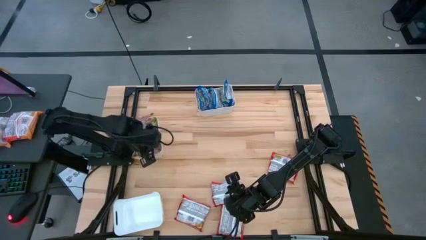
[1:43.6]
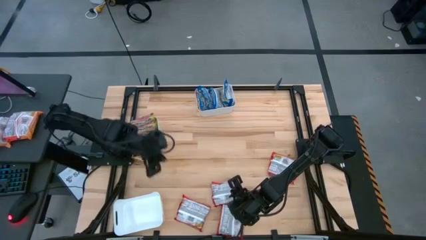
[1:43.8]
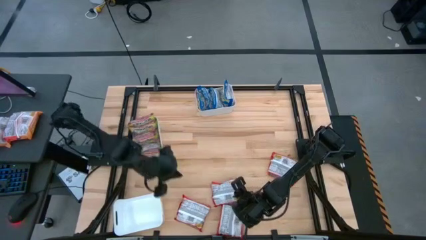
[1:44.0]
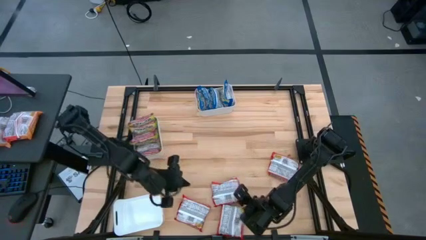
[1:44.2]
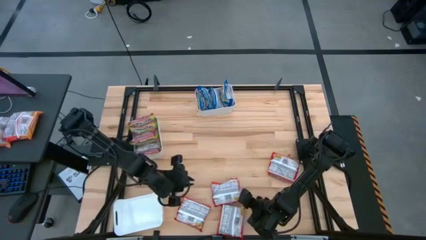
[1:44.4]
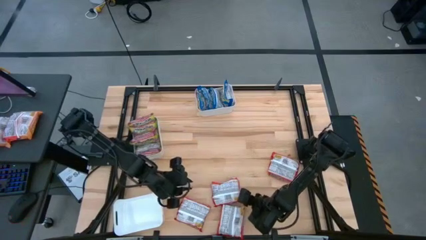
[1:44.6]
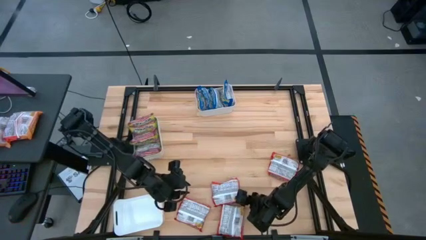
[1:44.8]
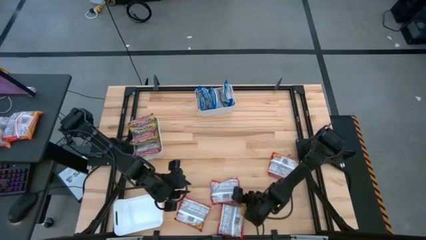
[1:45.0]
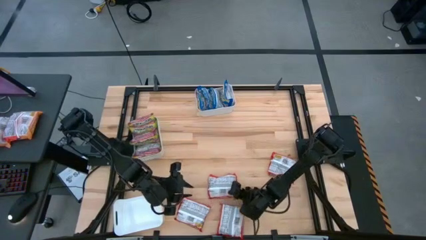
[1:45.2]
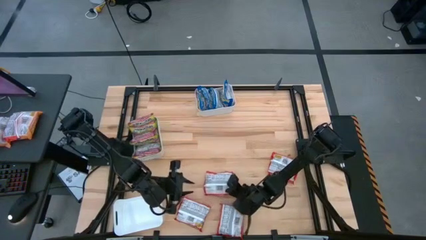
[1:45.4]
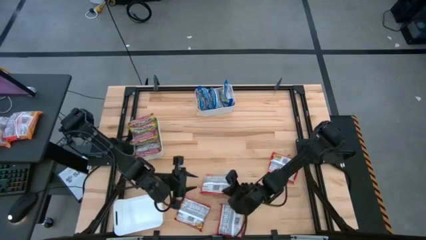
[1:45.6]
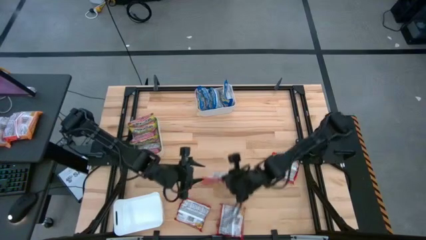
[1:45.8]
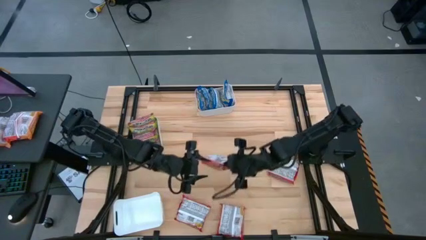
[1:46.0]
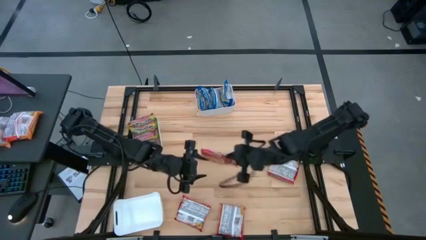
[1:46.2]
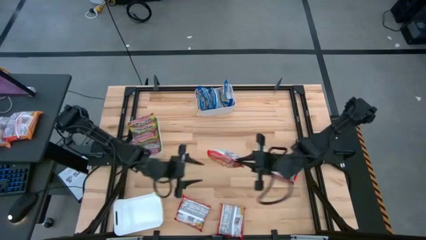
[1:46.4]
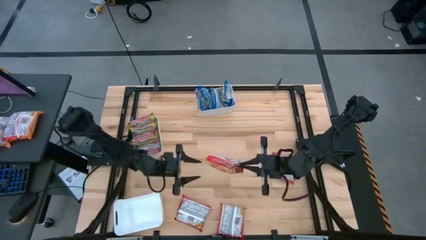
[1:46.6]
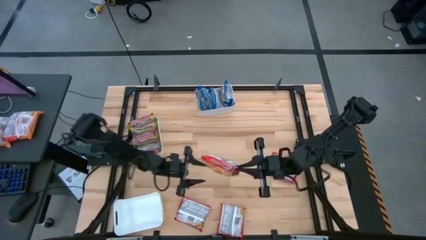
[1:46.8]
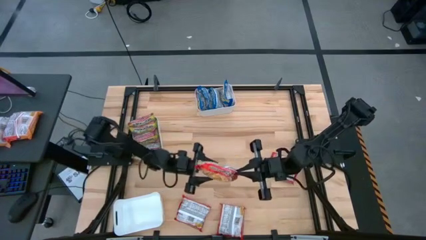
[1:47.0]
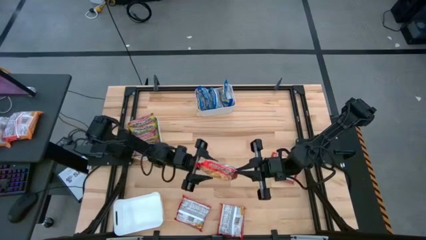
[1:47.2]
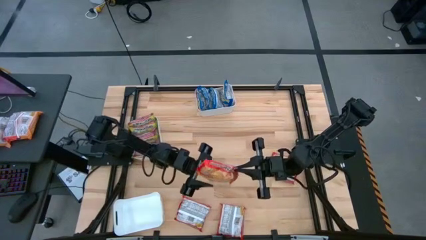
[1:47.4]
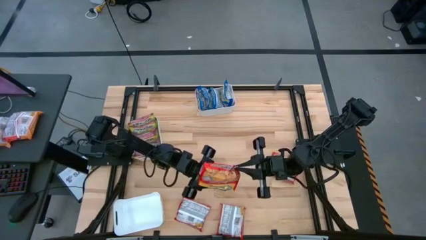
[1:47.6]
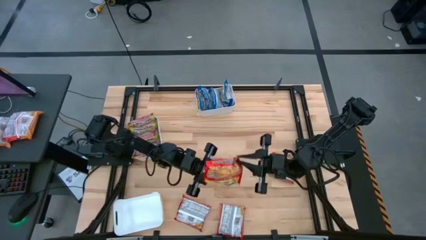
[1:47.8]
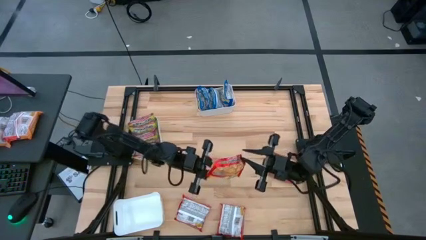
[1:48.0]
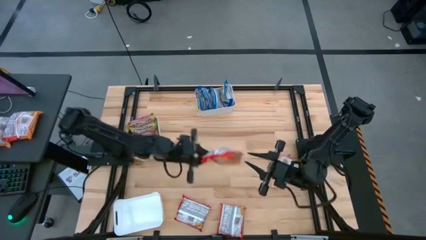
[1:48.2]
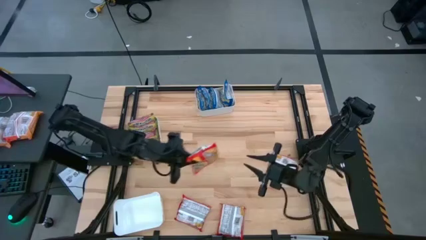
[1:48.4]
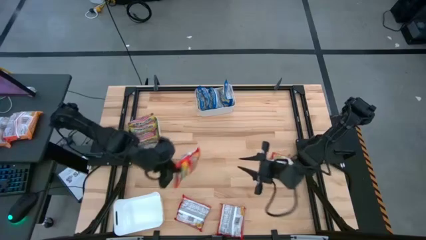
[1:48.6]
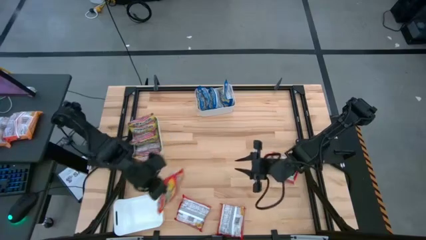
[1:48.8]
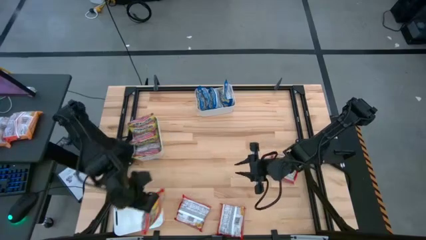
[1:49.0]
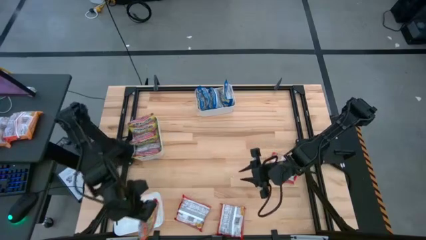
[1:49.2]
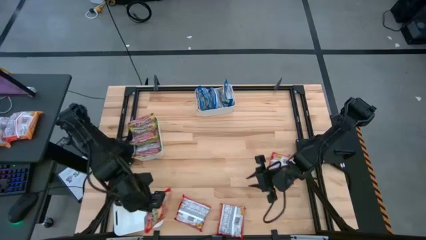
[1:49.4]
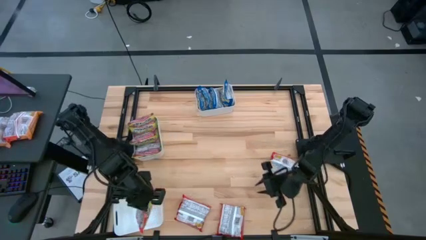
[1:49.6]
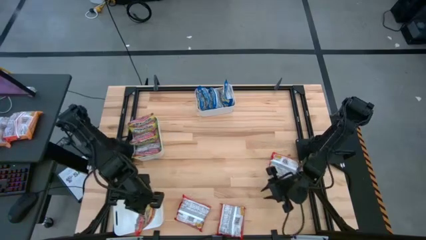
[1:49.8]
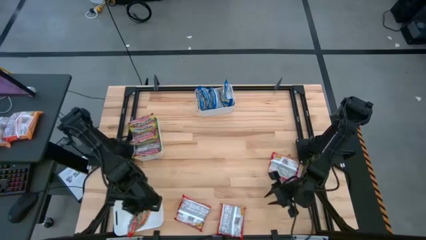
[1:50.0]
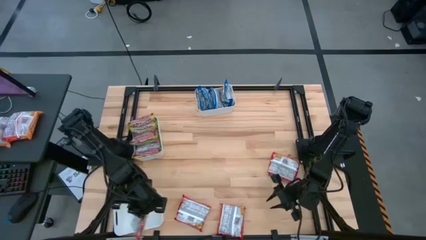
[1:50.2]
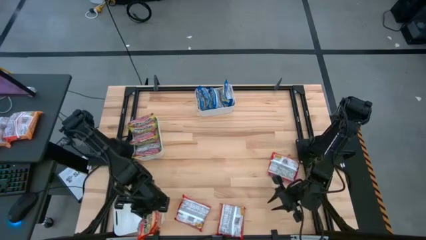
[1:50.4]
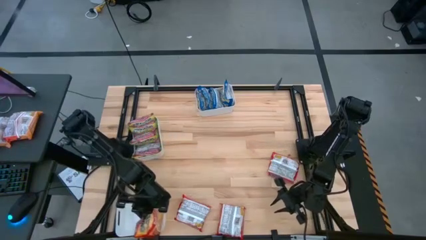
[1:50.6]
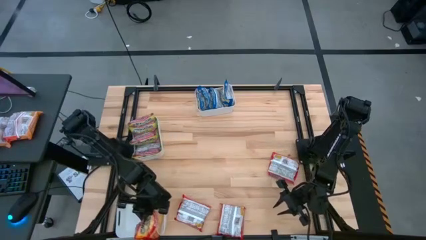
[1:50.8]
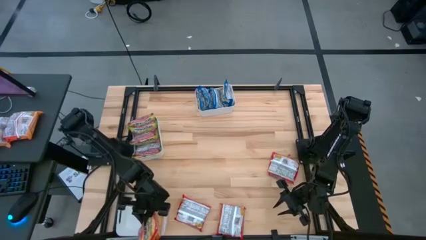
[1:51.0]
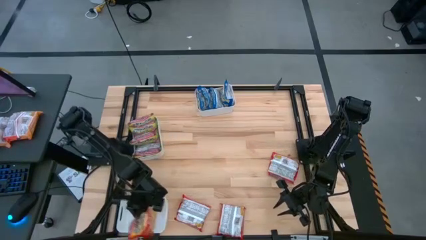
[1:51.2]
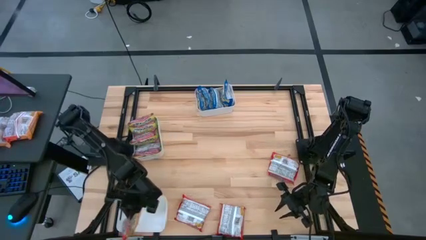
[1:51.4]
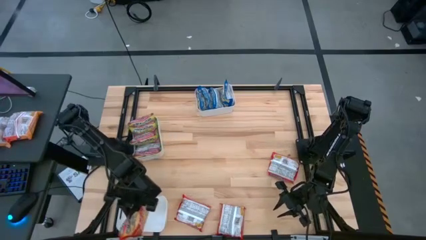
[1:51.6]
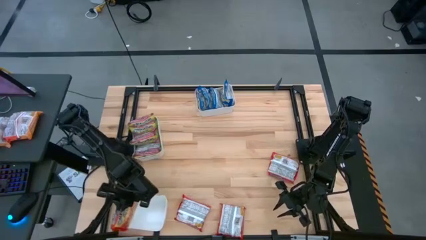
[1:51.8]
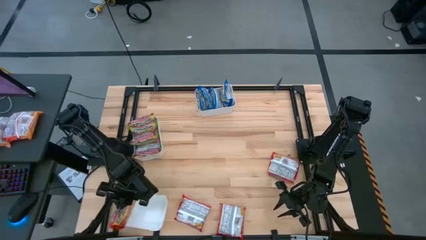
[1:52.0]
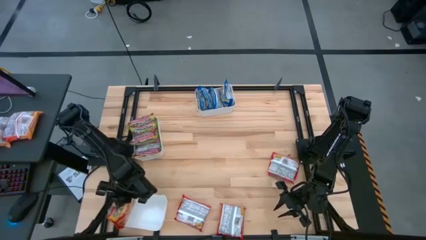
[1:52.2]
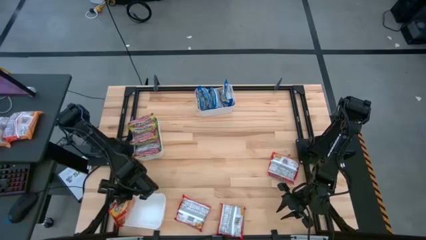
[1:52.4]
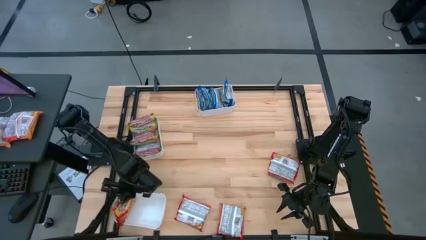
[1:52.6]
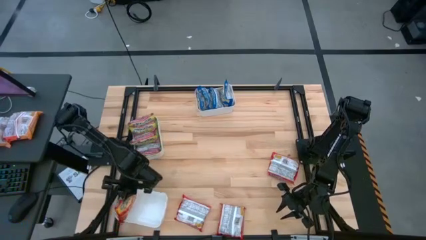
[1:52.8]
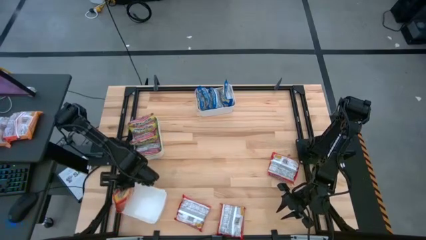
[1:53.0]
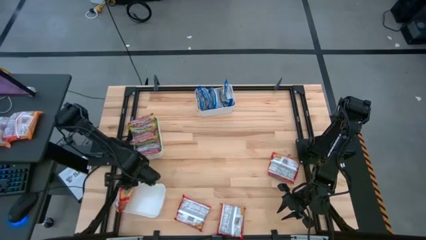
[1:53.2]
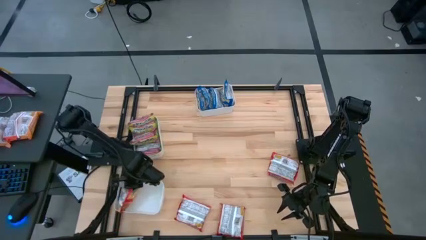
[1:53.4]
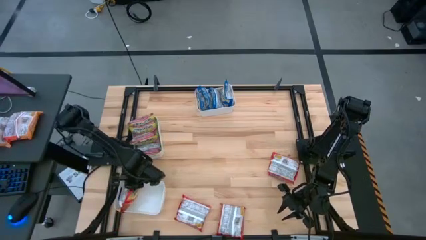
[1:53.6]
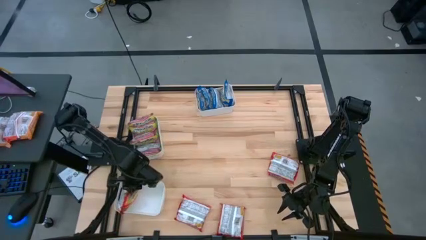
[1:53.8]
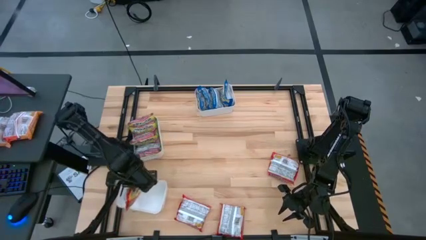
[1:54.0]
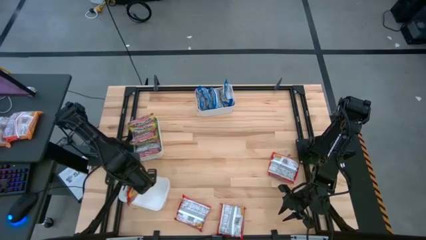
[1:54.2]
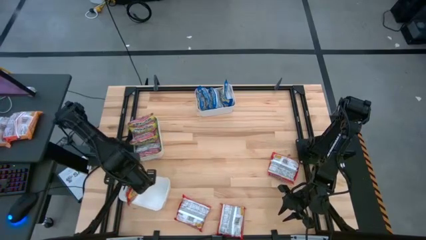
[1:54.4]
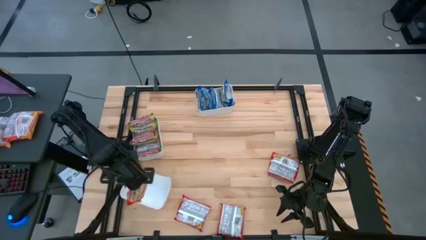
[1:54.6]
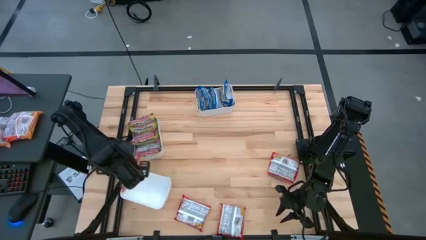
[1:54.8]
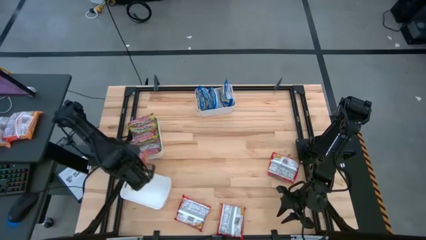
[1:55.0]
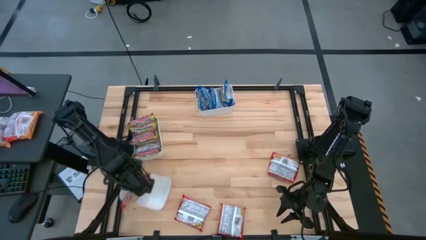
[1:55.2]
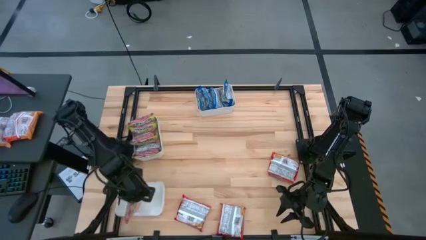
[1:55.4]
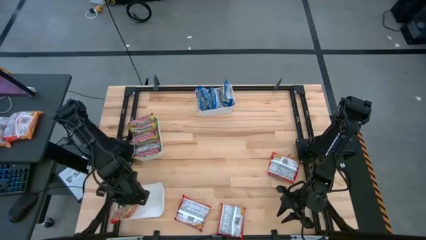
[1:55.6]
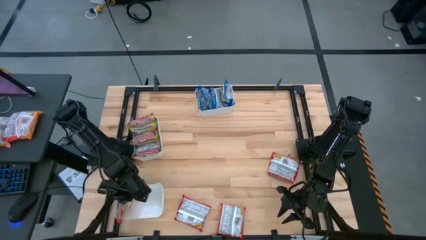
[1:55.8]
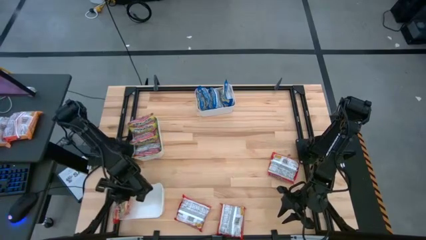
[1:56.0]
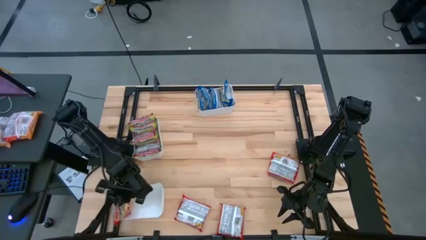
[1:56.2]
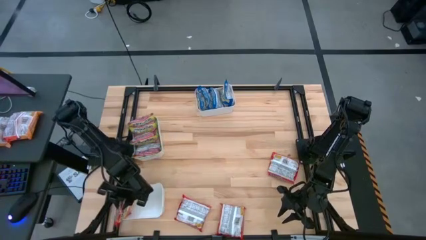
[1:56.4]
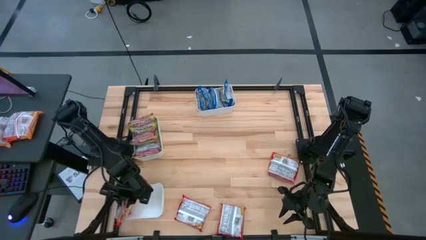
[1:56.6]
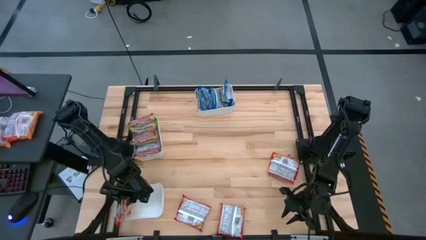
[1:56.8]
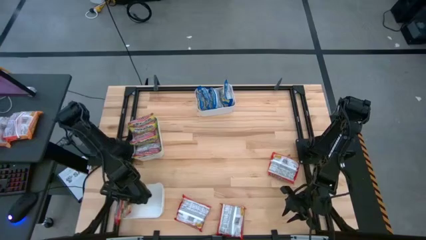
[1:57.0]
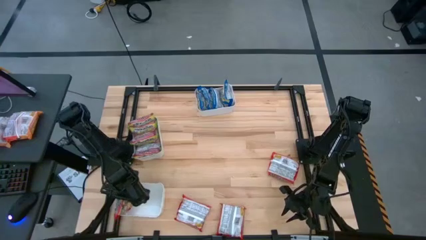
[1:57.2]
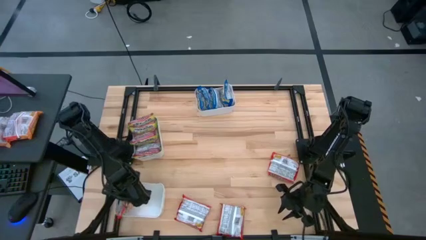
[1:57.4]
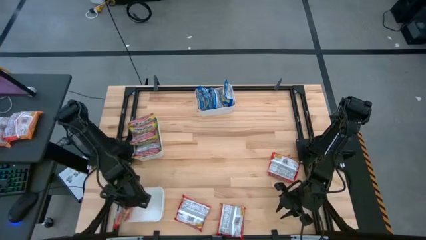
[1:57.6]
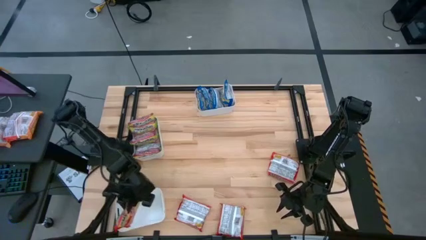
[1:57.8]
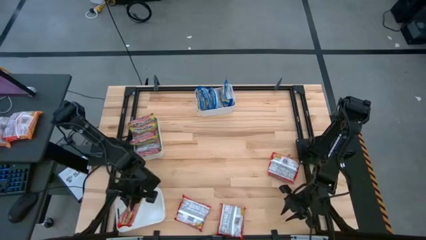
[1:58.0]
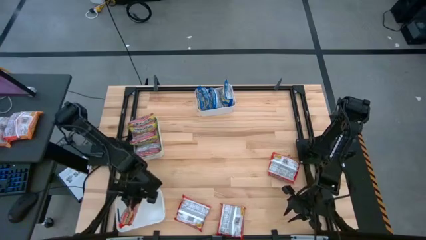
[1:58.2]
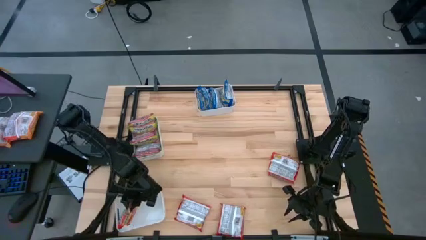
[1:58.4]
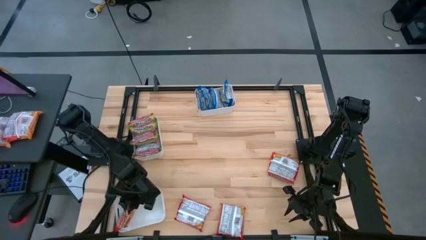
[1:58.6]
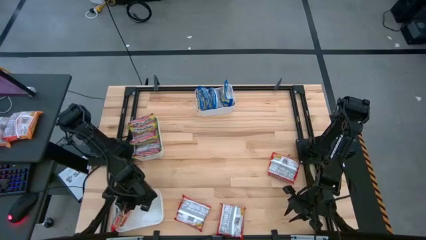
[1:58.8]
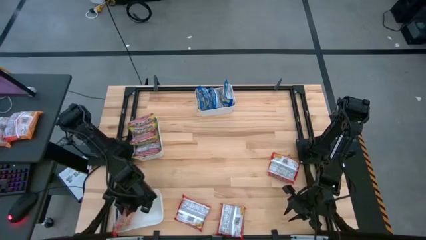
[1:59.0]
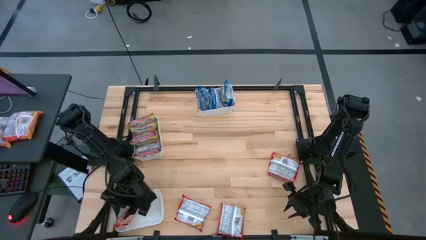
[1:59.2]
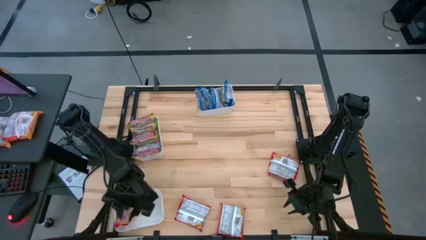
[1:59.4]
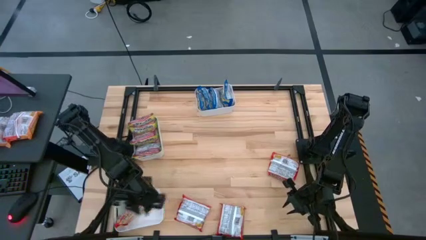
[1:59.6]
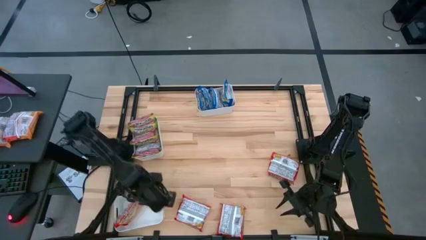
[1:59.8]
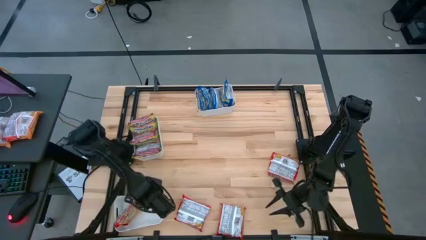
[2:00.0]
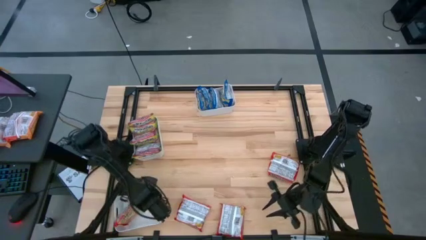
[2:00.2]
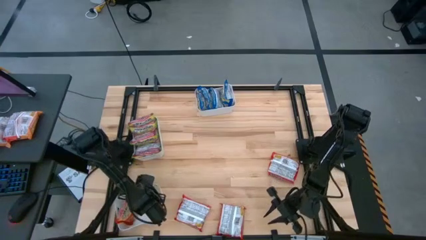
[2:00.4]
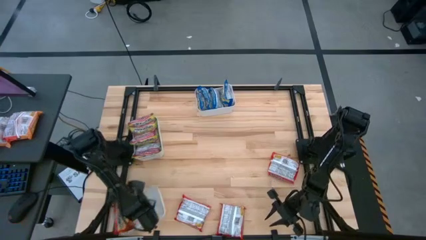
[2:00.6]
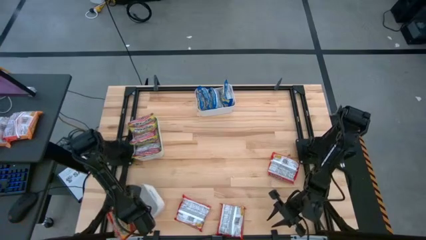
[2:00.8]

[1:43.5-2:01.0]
Task: Sort Maruchan noodles
Put the red noodle pack into the bottom white bin
